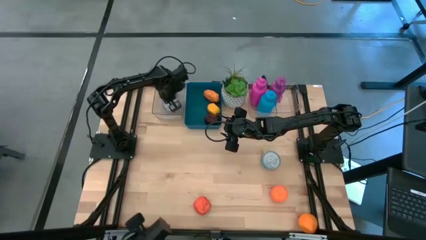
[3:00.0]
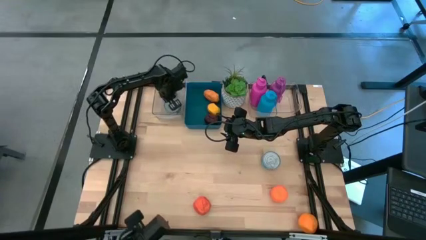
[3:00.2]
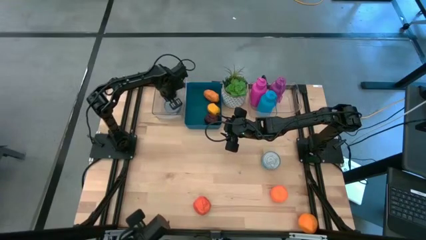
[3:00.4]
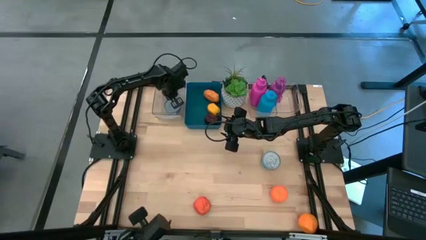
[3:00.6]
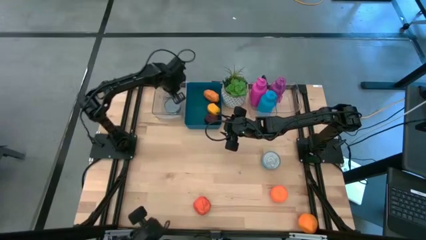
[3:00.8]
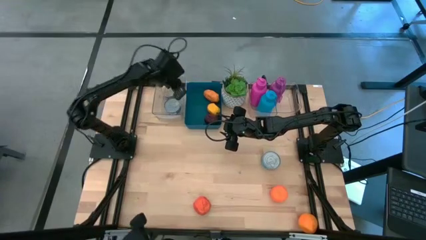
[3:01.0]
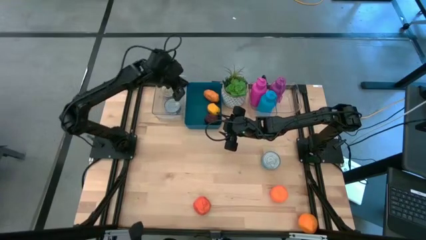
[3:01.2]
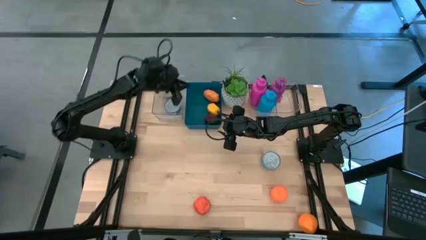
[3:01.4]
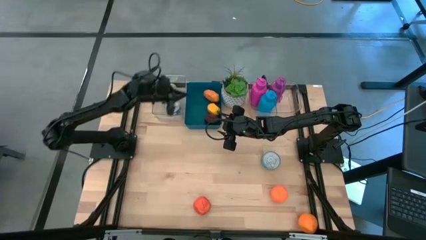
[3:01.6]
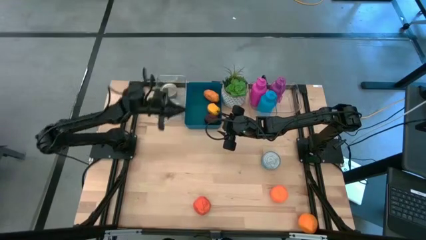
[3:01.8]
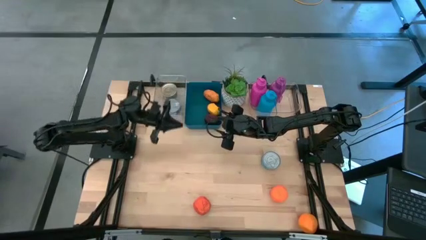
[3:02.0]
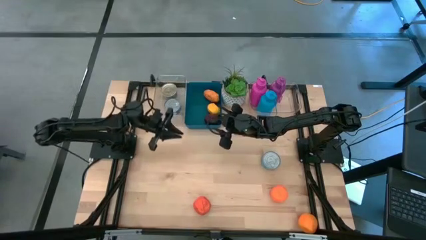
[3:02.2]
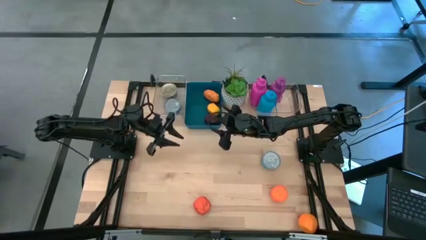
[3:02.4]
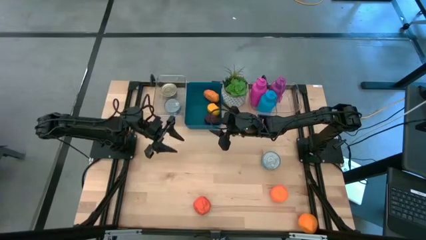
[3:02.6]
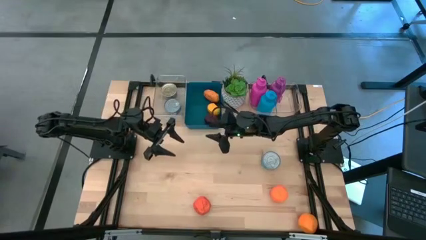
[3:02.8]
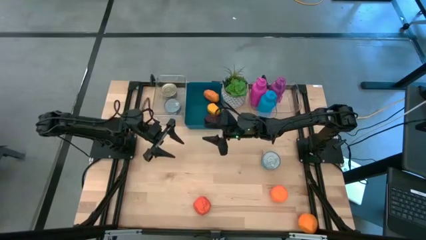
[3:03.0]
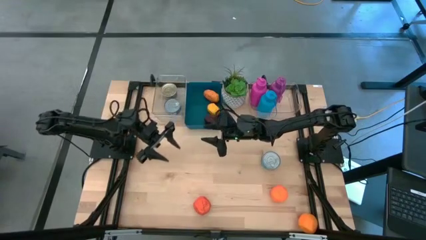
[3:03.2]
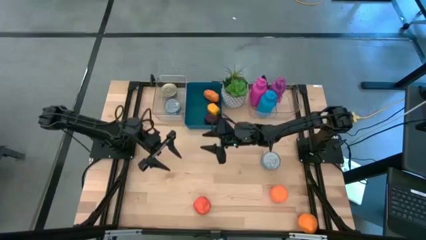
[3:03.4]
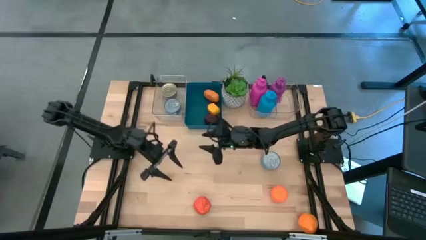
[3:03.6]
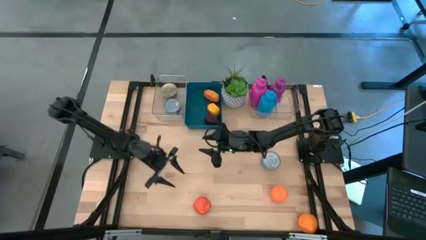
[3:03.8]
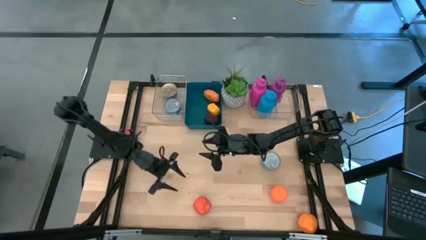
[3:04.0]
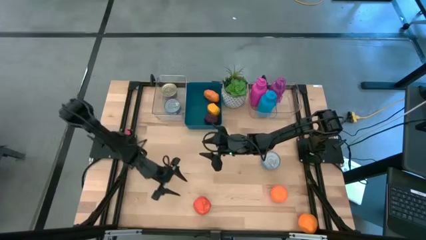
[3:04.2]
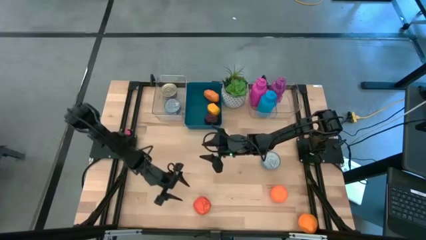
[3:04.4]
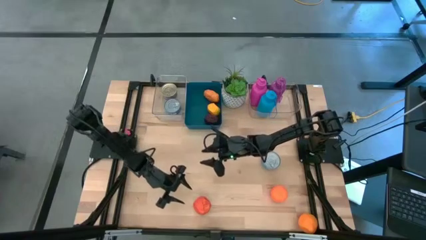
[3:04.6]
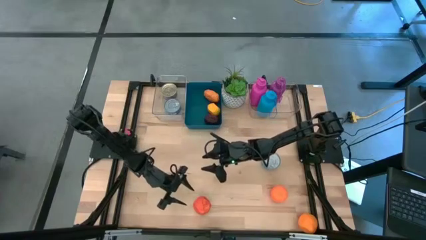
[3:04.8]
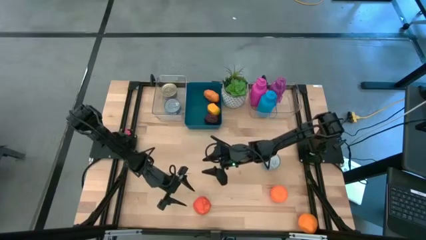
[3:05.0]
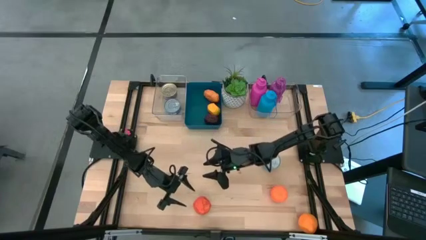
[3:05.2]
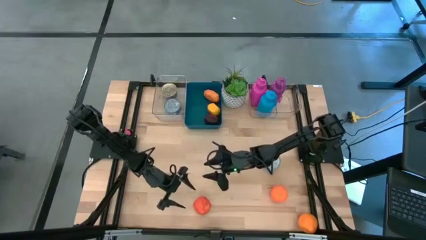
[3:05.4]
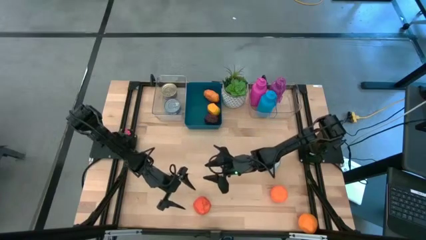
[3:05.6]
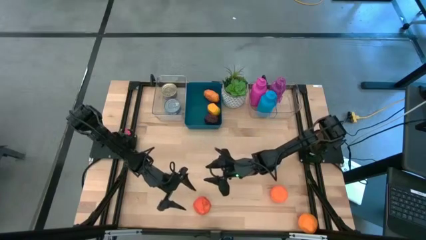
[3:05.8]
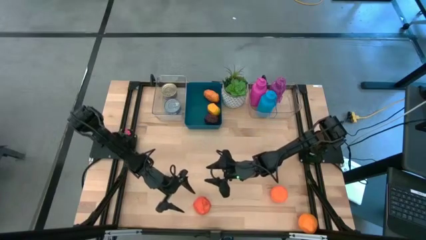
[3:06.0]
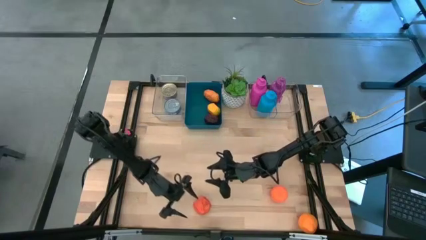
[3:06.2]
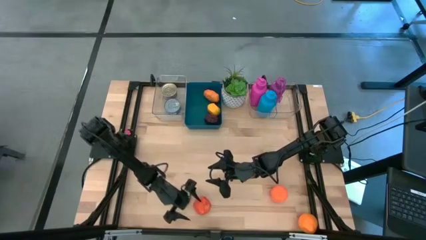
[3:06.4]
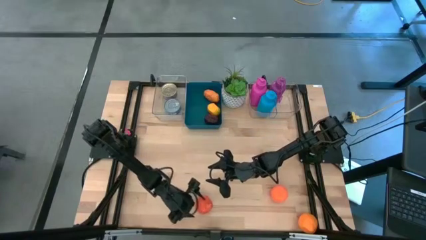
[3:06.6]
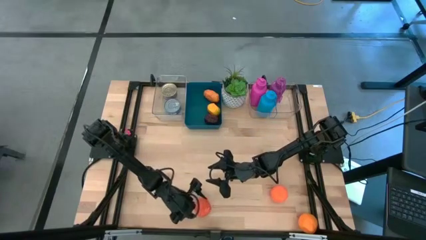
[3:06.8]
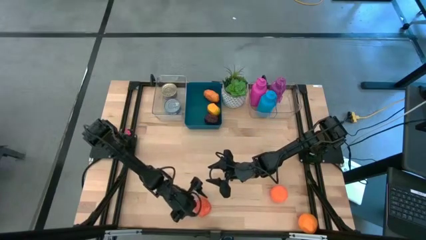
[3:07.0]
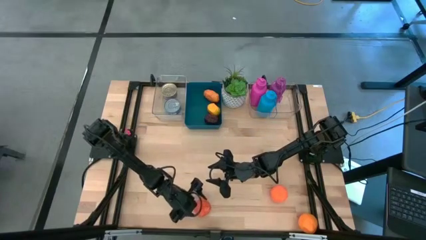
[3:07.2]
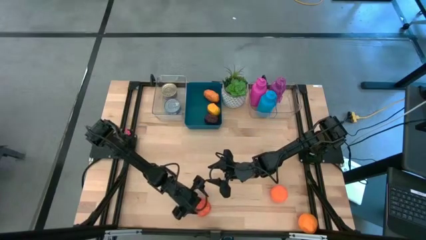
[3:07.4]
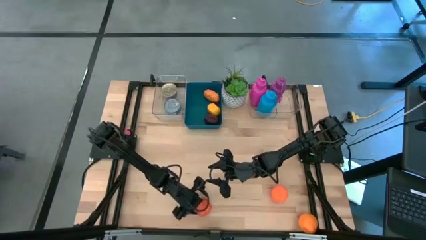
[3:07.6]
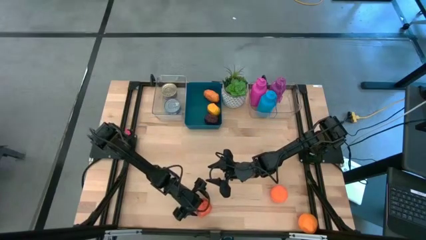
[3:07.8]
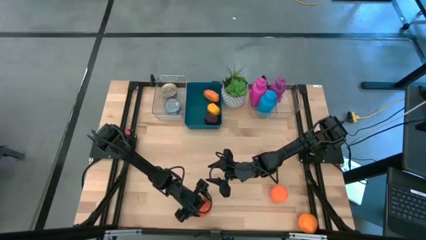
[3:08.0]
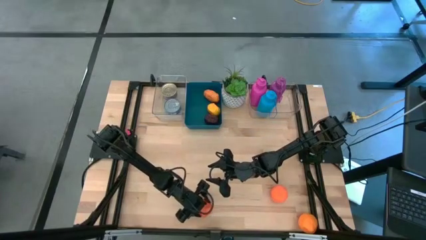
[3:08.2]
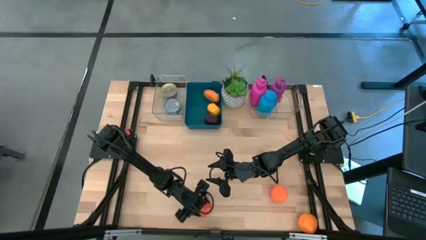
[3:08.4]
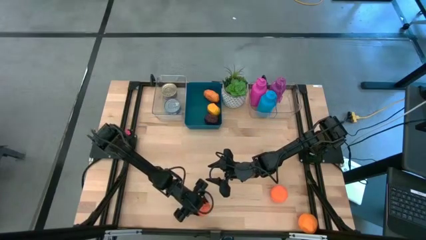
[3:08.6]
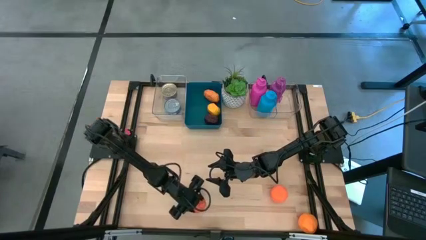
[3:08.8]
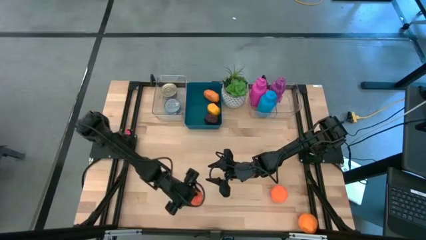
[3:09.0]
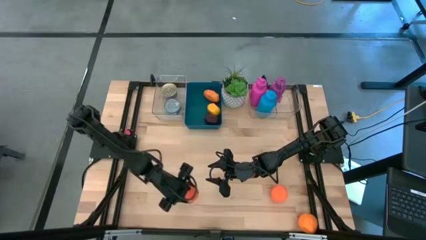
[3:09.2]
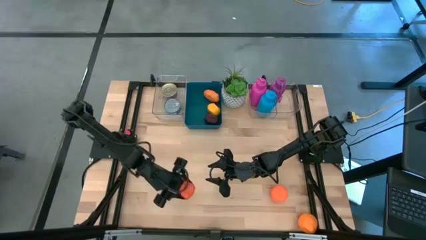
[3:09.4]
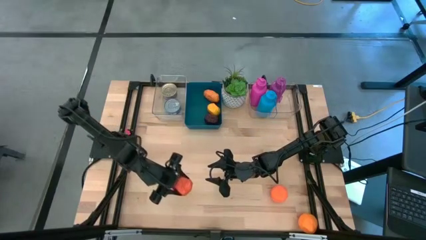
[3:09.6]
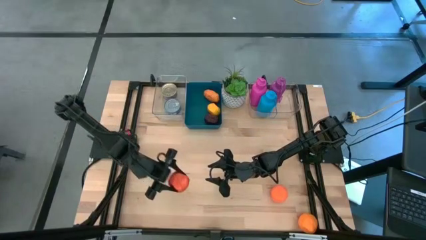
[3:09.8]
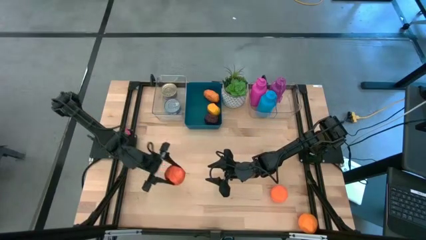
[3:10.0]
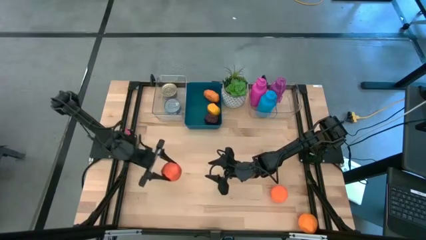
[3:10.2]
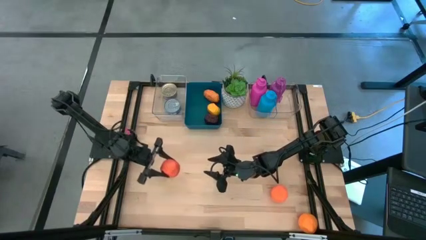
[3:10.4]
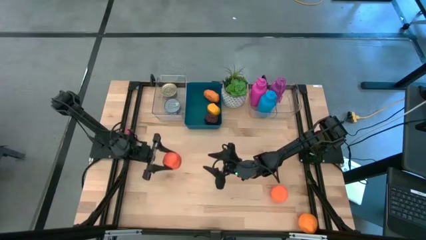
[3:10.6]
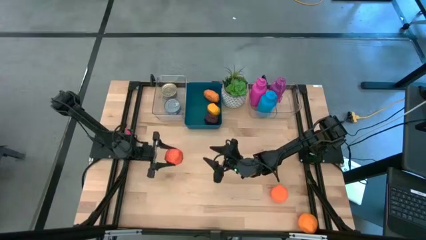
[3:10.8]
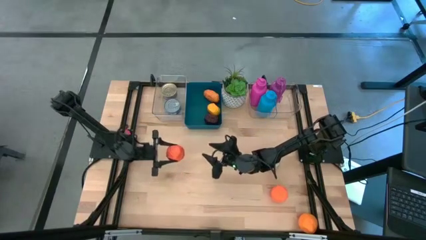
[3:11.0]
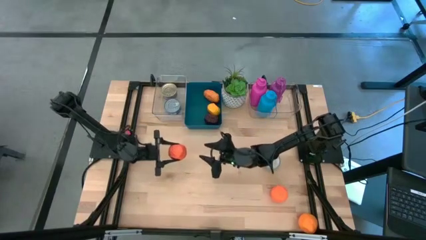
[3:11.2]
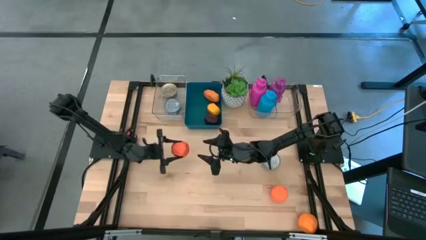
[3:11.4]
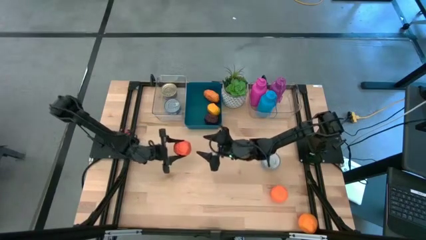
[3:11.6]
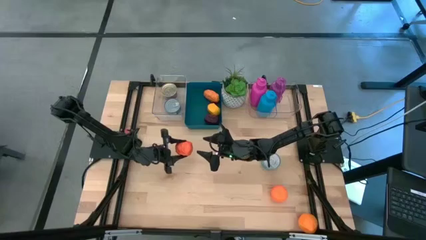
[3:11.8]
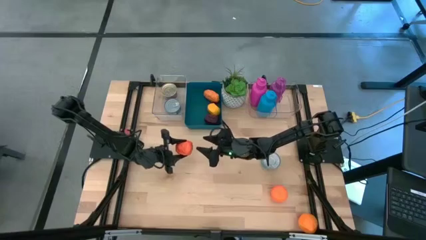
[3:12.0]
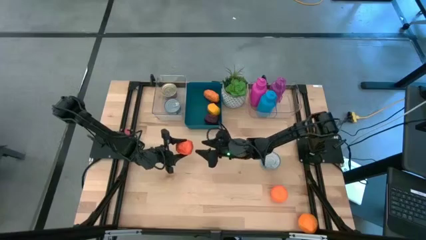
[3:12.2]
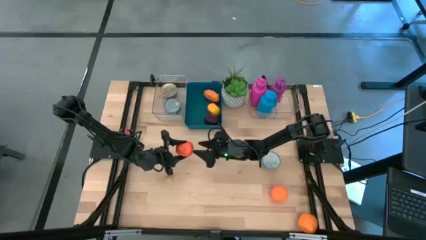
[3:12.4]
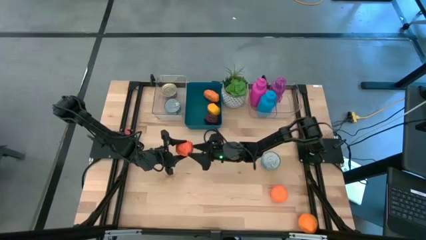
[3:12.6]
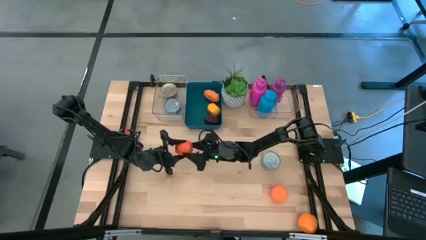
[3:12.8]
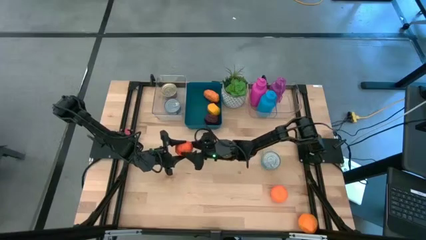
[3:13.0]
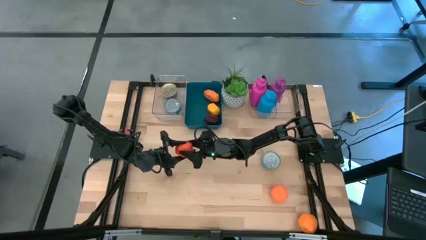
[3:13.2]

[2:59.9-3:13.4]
Task: Pick & Place Food Item
Put the left orange into the blue bin

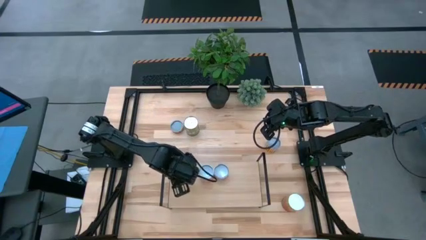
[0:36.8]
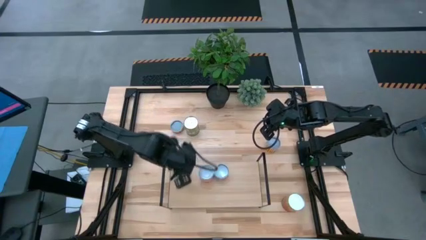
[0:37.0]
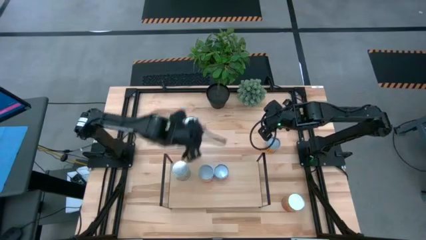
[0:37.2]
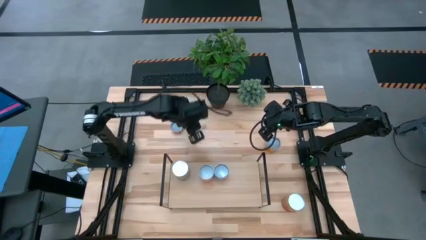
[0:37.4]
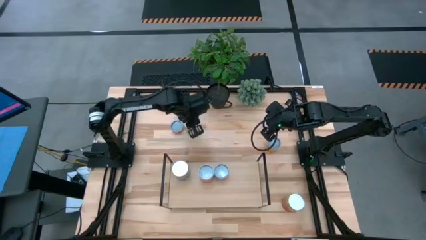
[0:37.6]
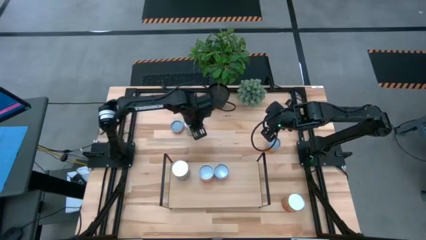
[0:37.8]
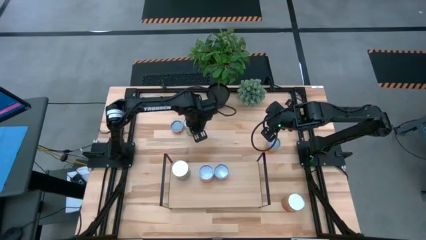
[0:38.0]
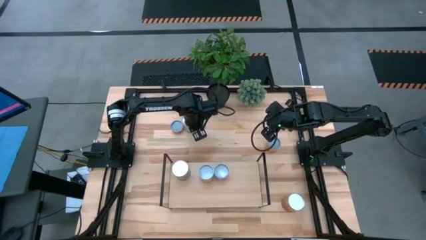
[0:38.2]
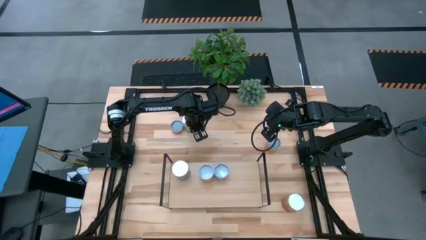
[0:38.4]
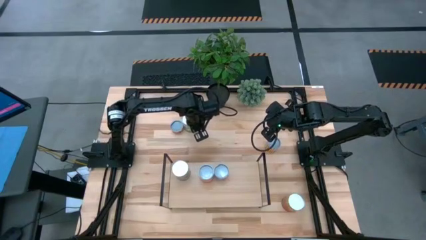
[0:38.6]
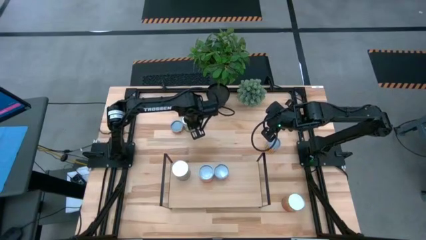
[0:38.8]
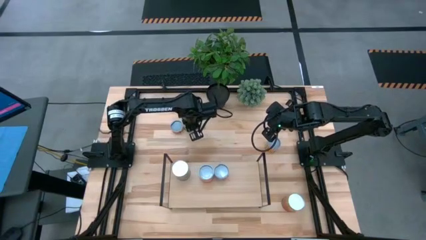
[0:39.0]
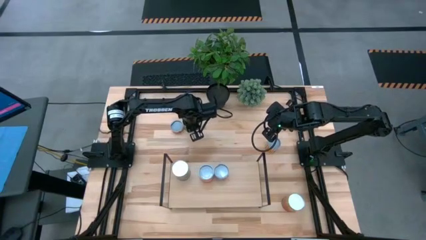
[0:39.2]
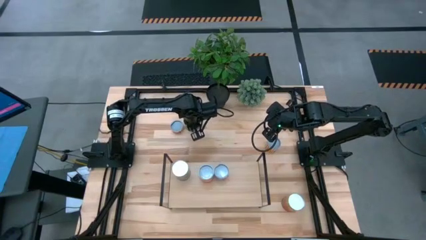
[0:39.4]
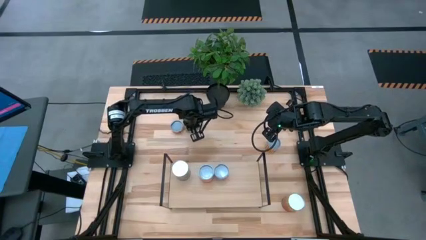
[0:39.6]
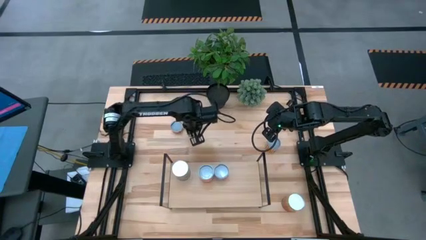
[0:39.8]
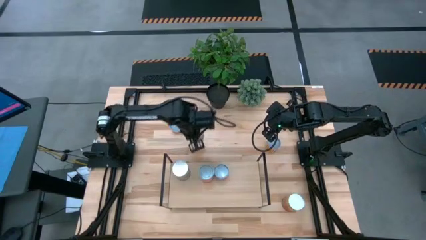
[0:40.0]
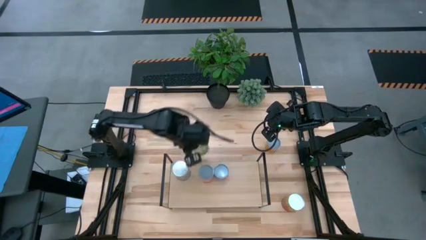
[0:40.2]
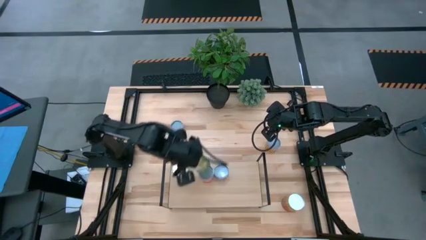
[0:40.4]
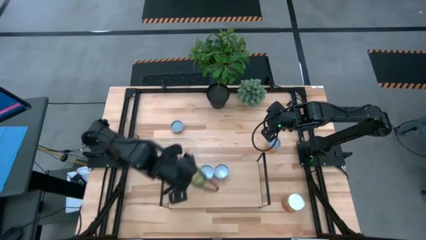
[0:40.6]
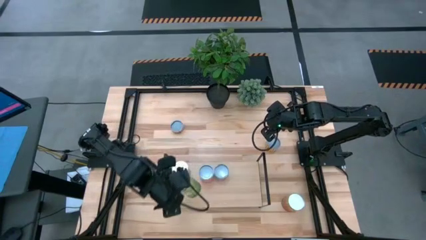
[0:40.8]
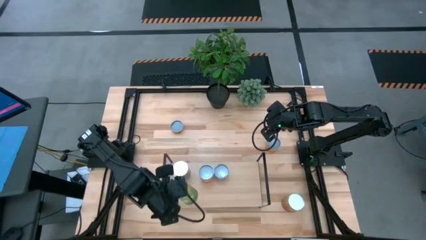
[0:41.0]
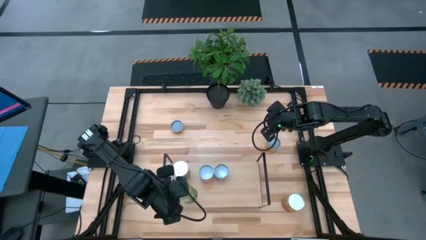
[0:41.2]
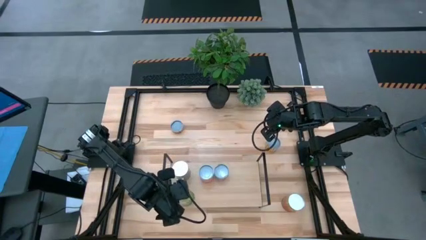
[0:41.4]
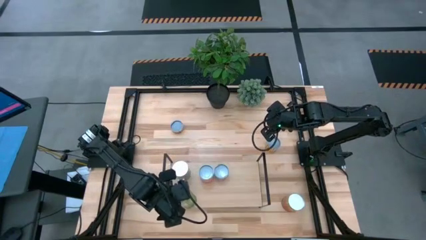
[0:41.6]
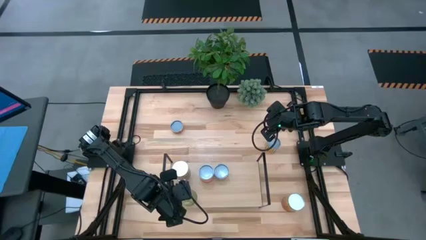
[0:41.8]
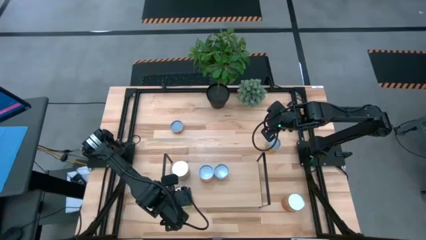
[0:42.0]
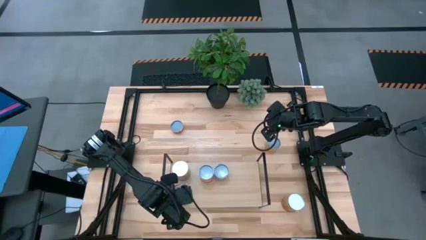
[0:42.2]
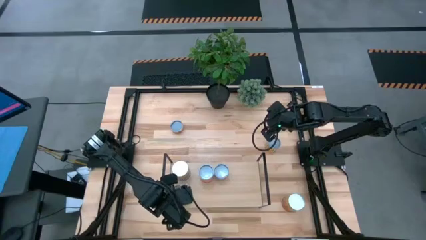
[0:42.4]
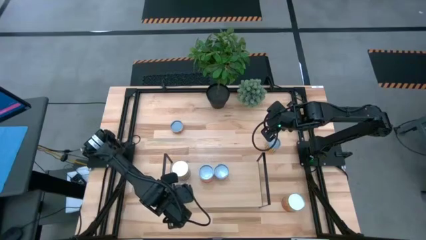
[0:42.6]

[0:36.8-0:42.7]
Task: Pick and place cans onto a shelf
Put the green pear can on the shelf aligned with the other blue tomato can
